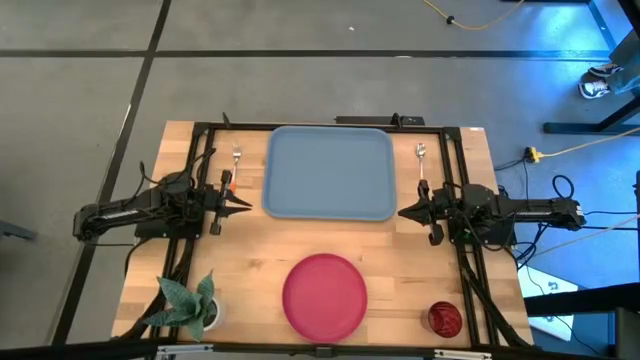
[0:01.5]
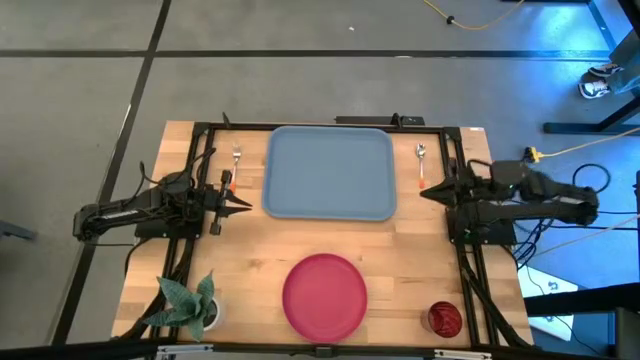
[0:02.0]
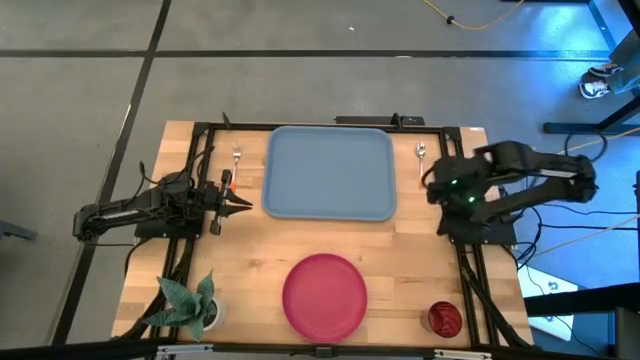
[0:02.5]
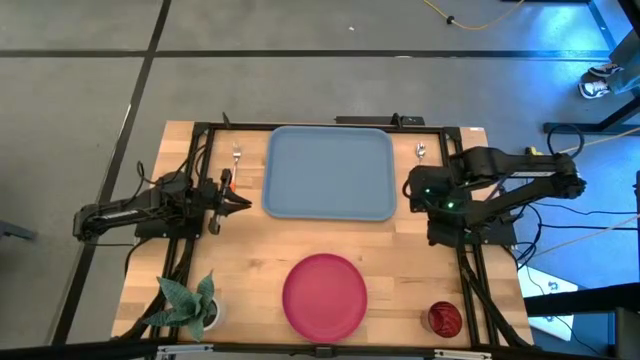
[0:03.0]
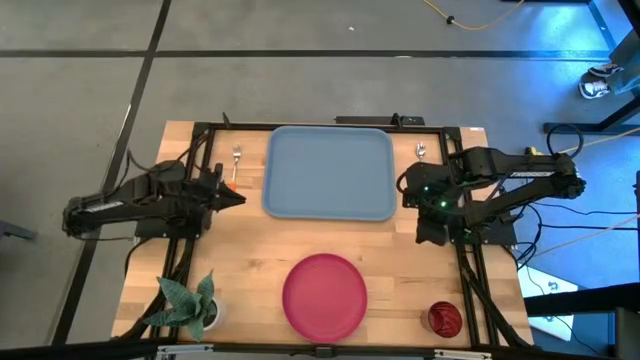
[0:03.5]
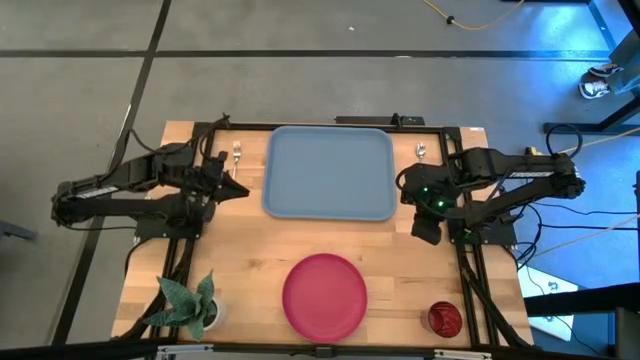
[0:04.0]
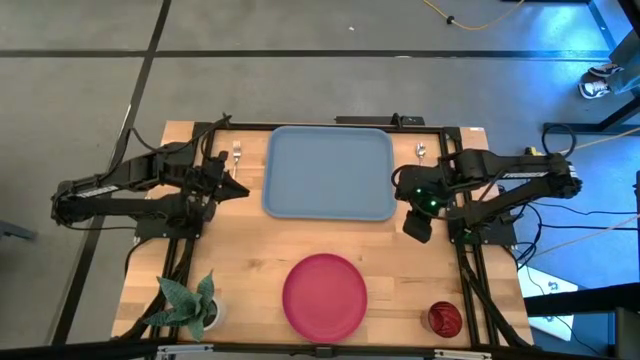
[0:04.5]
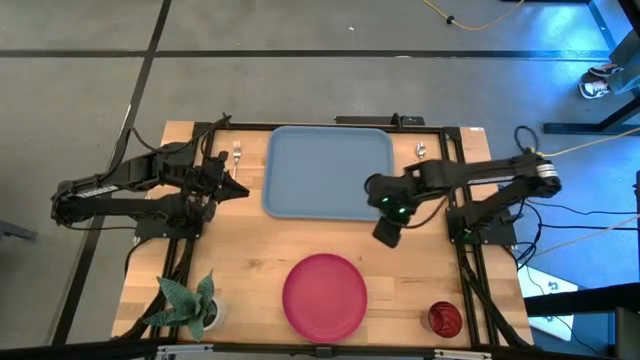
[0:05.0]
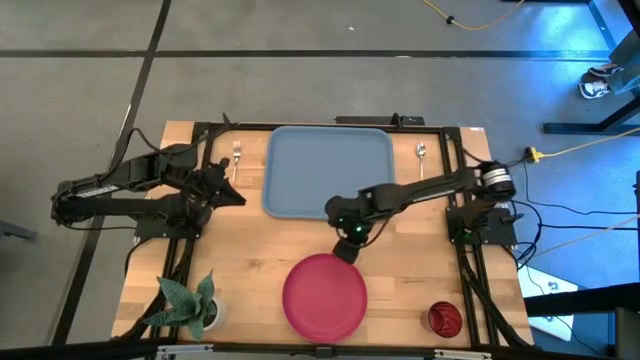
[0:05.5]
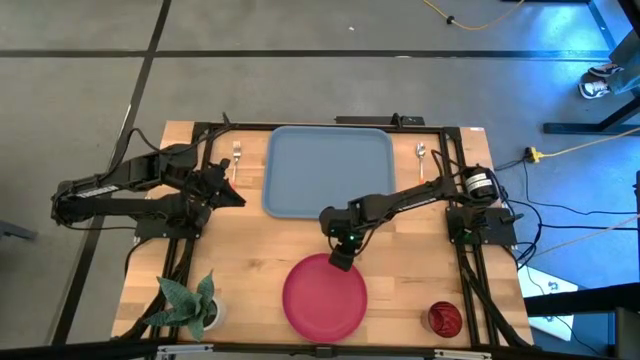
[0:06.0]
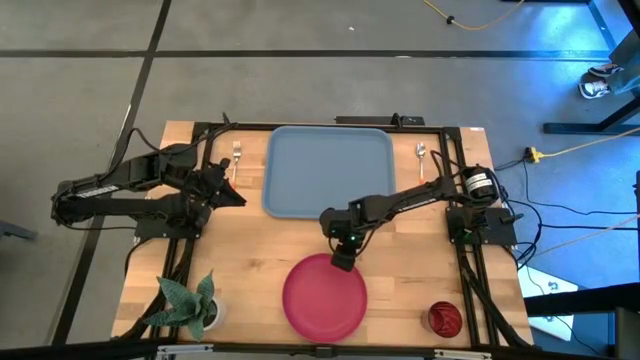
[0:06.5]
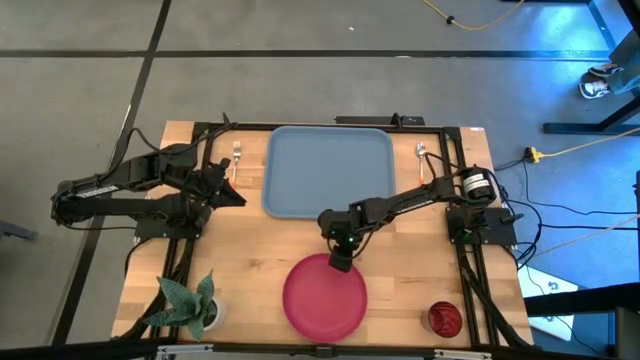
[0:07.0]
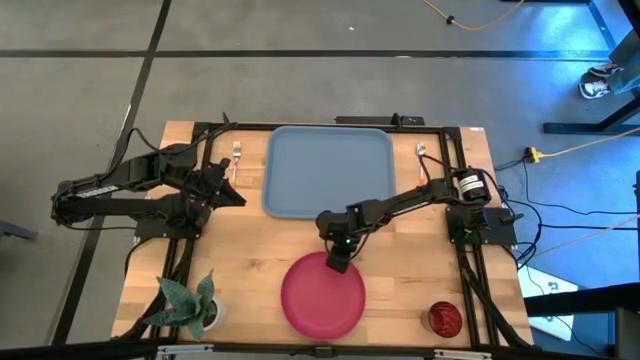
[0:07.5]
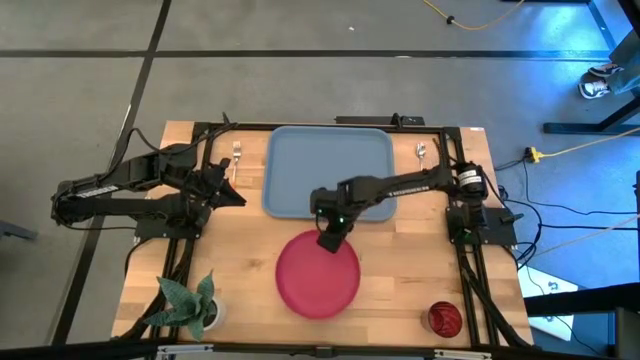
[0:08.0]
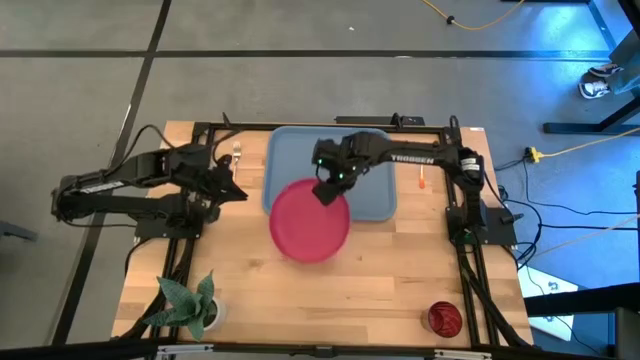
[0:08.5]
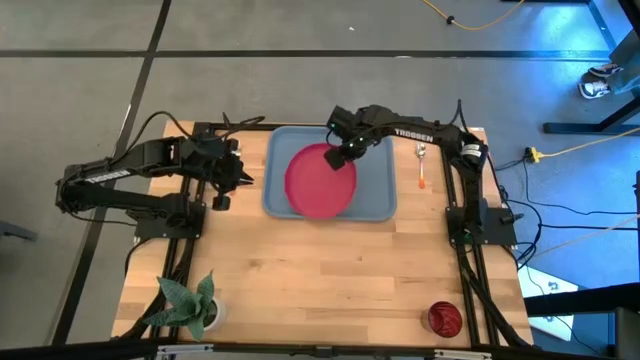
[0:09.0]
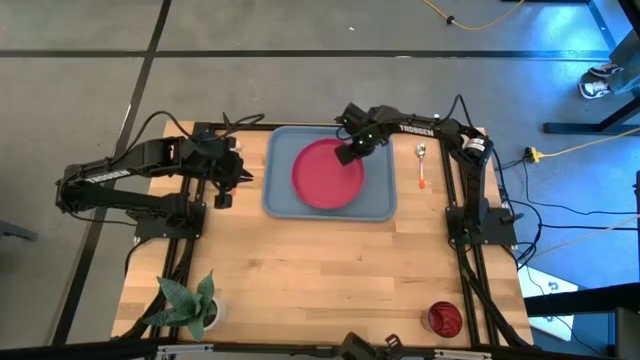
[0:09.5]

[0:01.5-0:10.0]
Task: Pick and place plate/cup/fork/spoon on tray
Put the pink plate on the middle of the blue serving tray

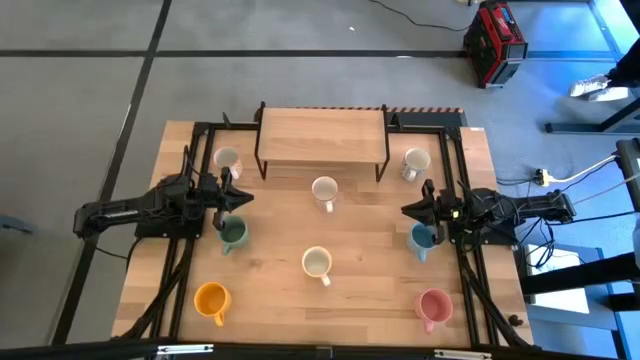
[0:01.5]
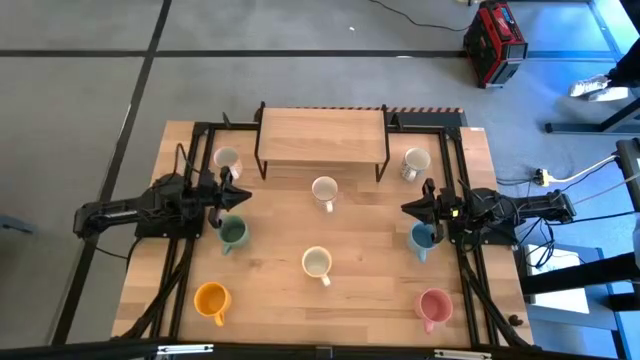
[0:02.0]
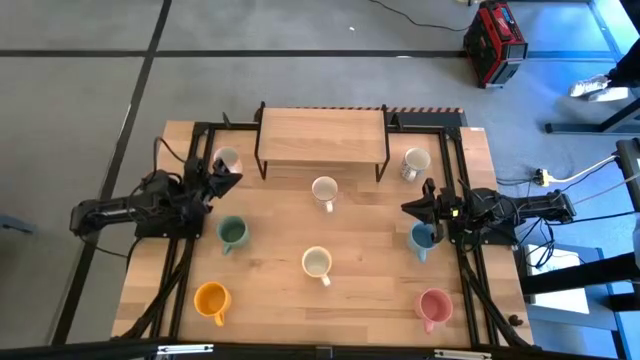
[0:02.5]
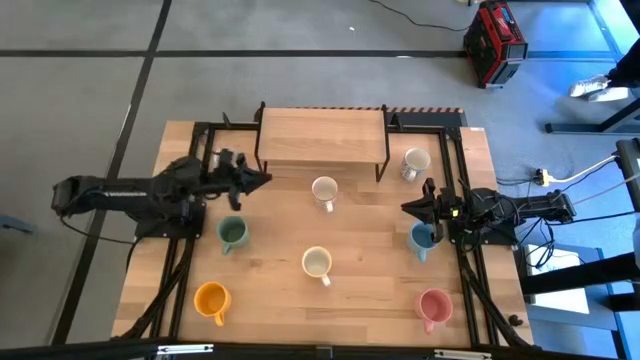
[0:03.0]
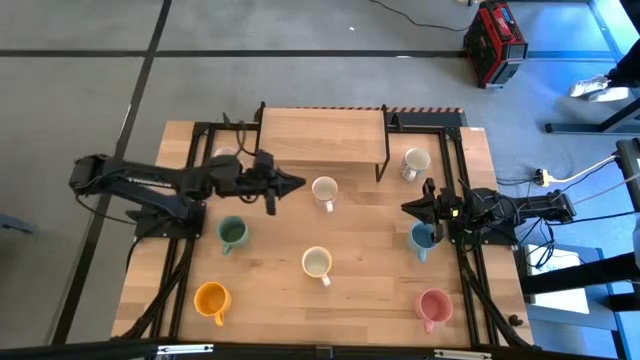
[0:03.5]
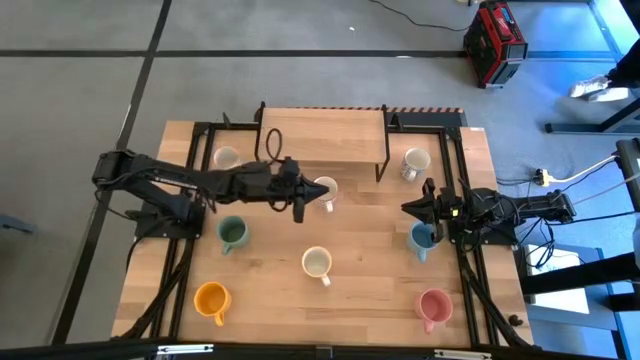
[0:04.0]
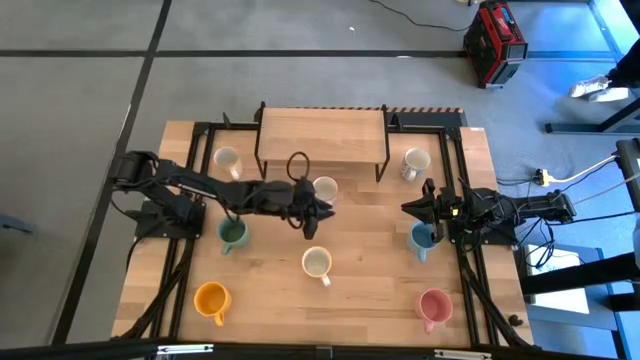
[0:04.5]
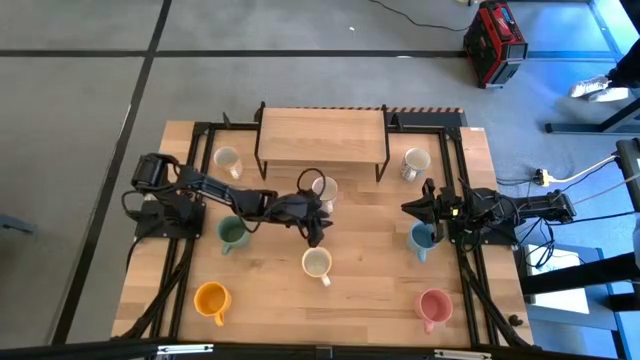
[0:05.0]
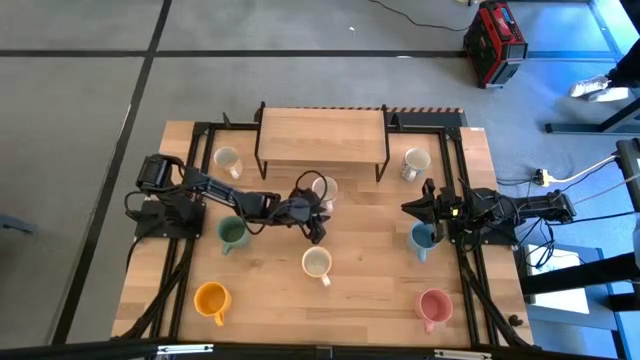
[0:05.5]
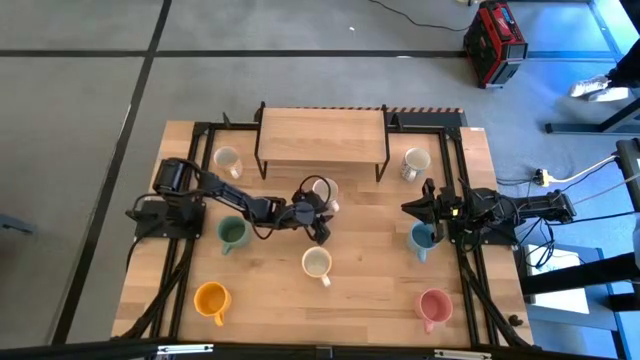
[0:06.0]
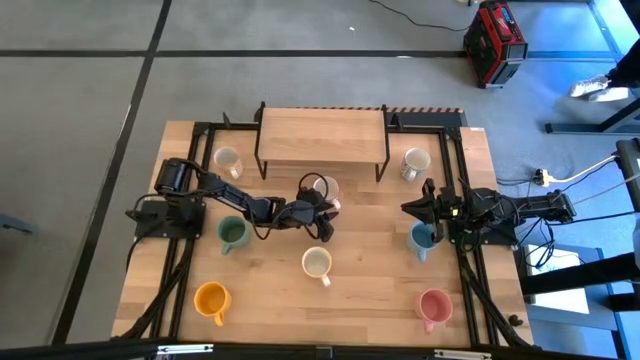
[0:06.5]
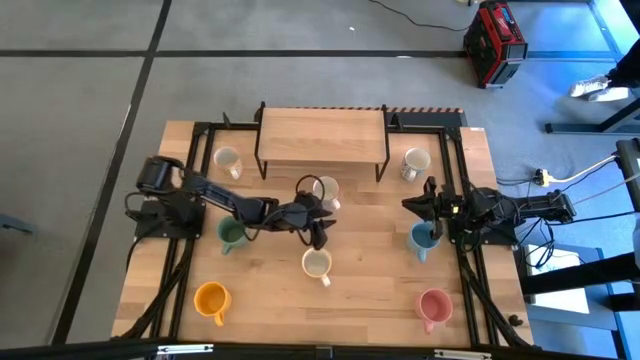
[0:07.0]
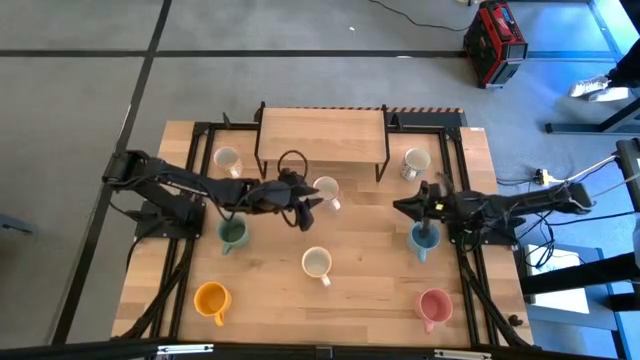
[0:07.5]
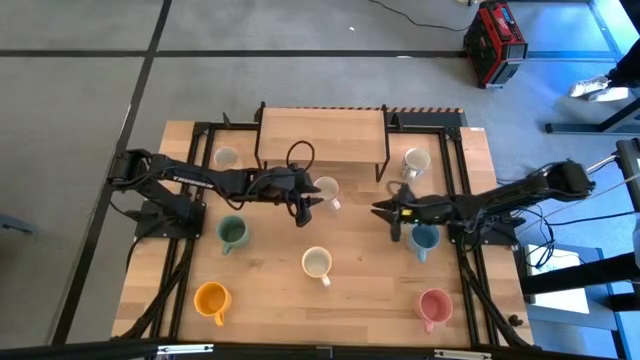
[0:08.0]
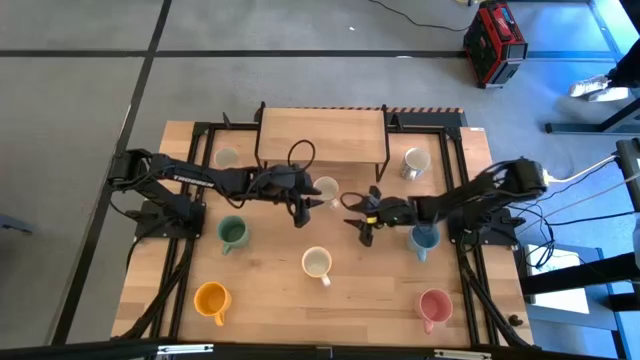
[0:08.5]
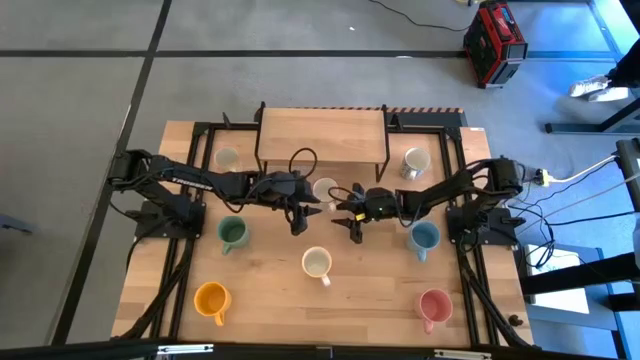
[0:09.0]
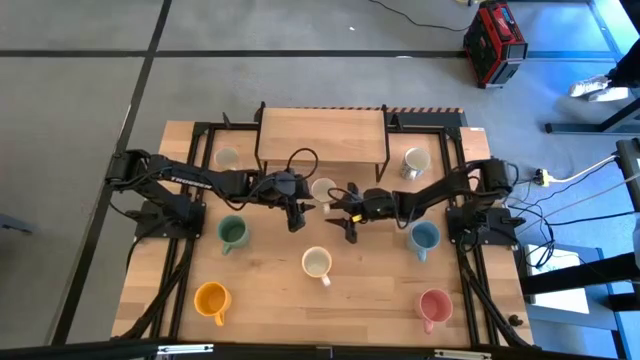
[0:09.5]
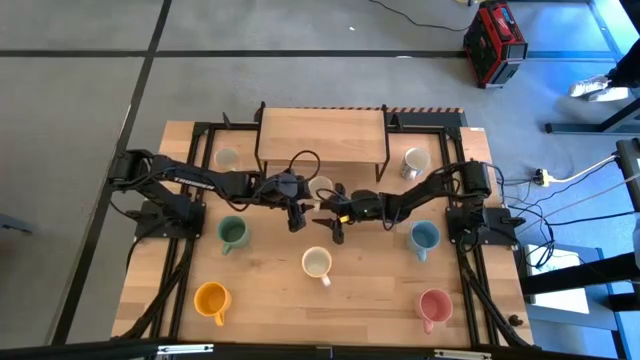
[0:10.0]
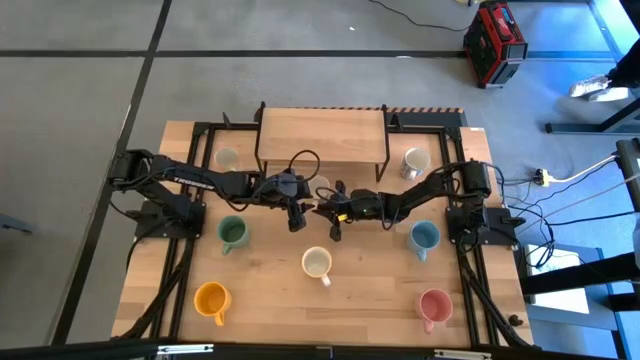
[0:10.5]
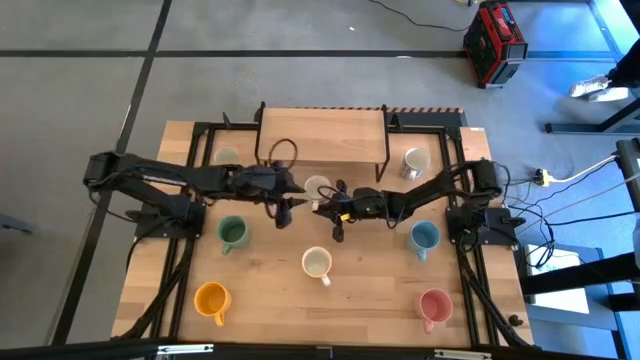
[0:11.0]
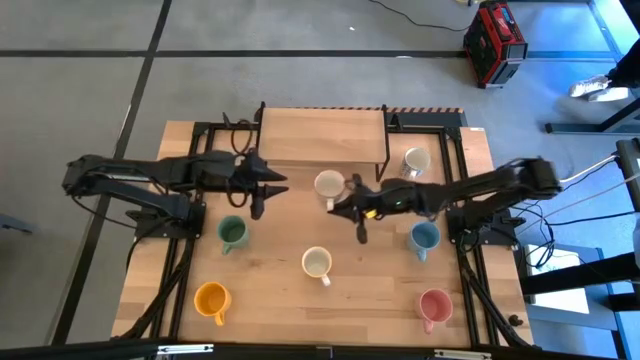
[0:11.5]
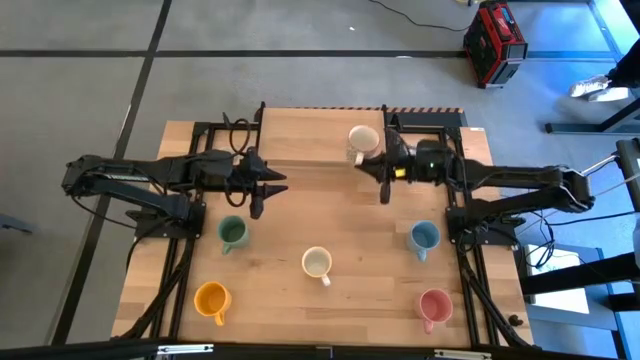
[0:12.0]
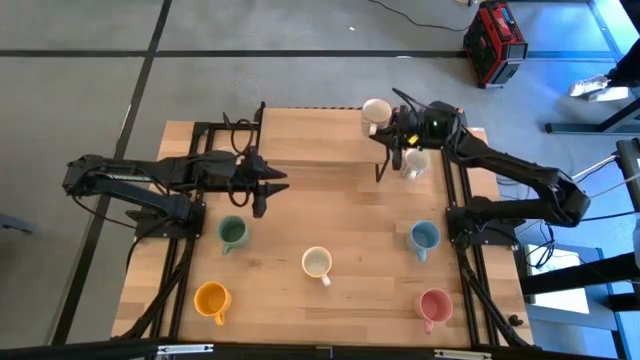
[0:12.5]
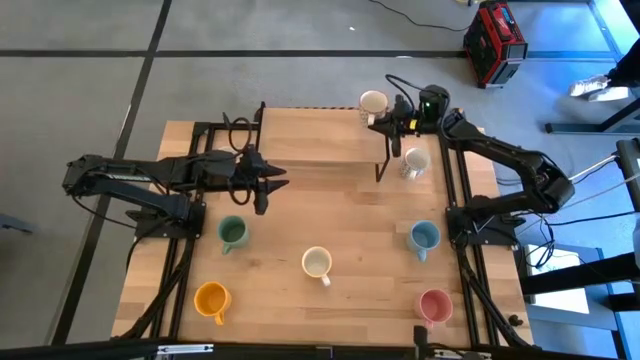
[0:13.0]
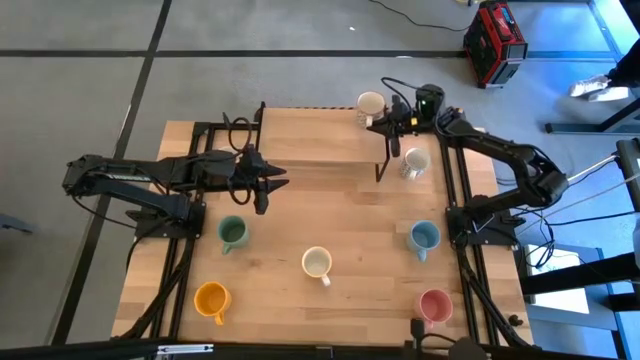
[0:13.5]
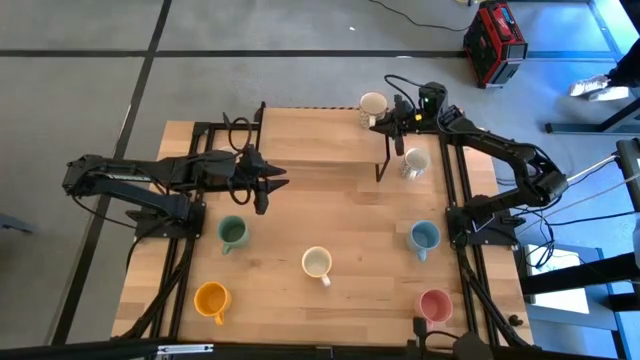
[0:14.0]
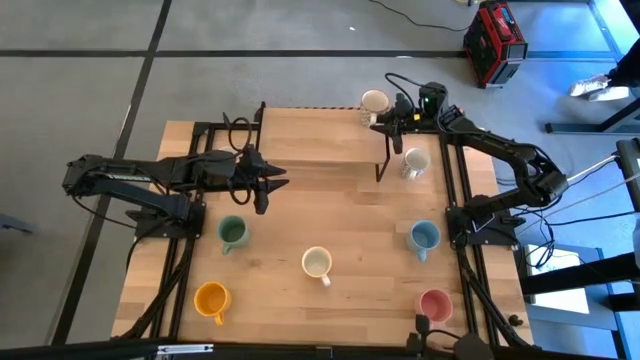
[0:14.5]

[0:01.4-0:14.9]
Task: Place coffee mugs
Put the gray patterned mug on the shelf
